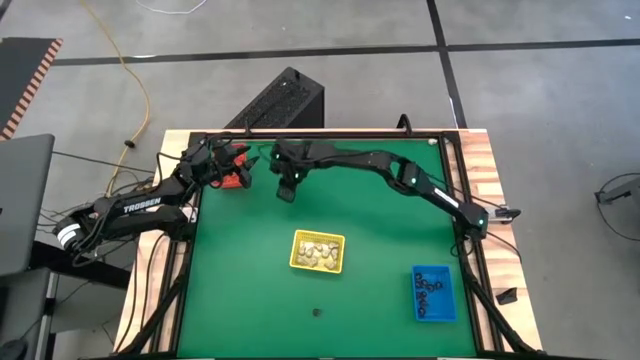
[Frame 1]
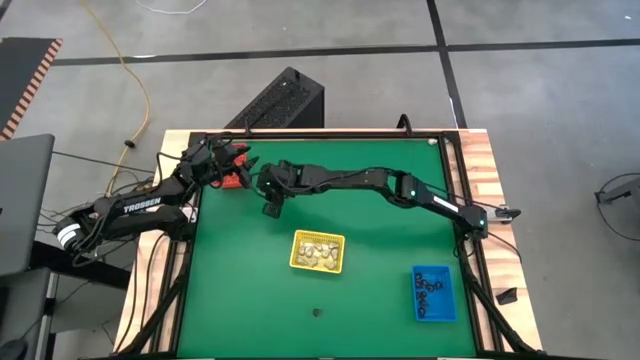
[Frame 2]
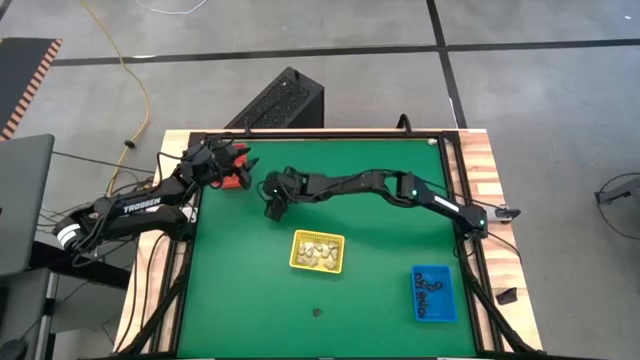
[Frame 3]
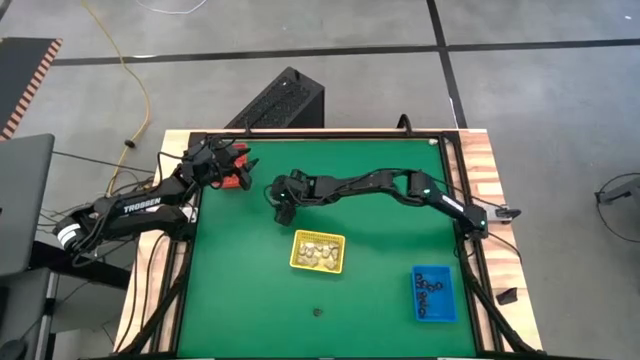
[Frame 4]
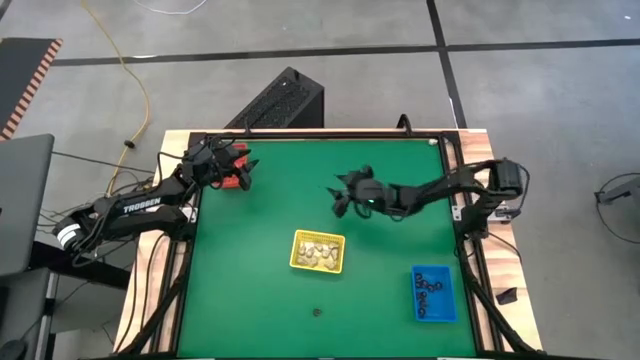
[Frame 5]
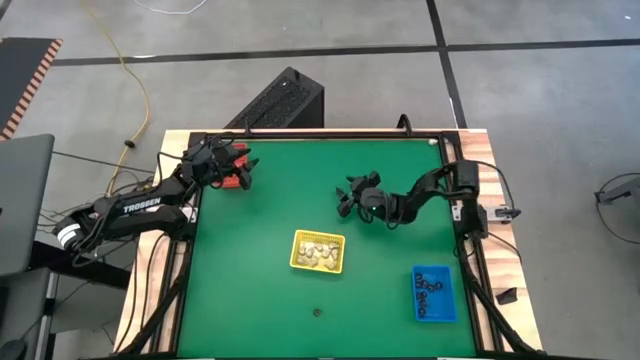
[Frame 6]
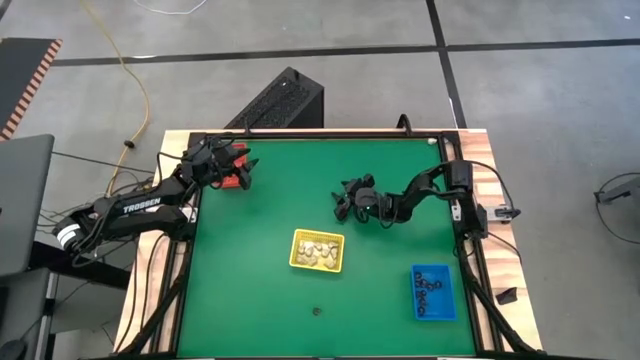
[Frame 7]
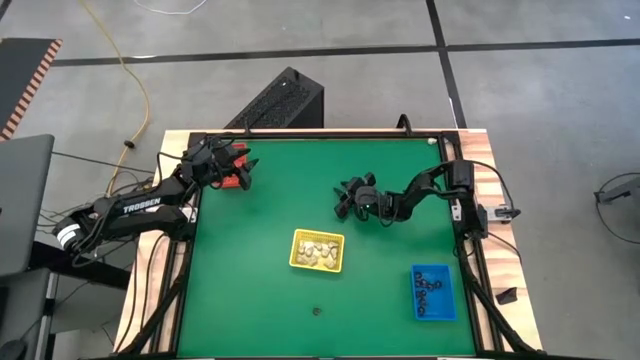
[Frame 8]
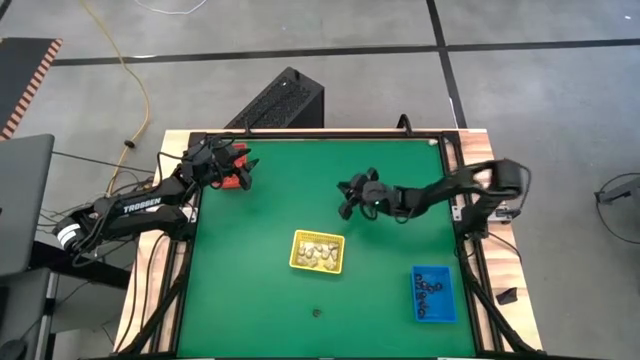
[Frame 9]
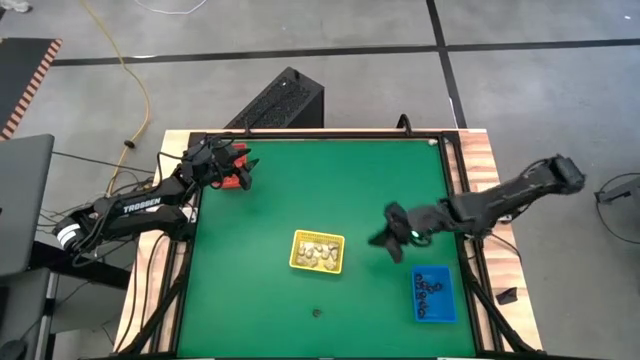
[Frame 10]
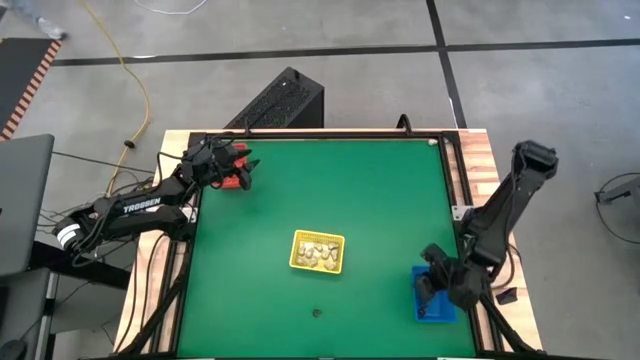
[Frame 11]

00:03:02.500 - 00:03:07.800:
Task: Sort Halloween decoration
Put the black skull toy into the blue bin

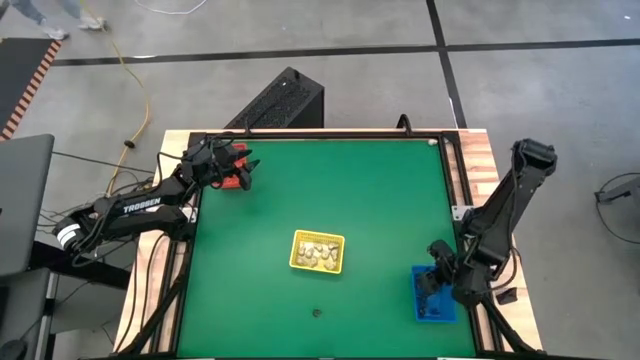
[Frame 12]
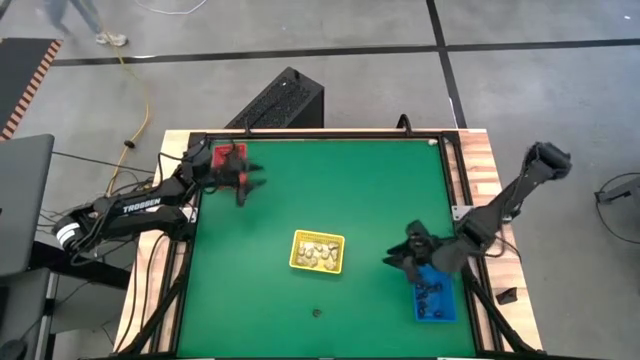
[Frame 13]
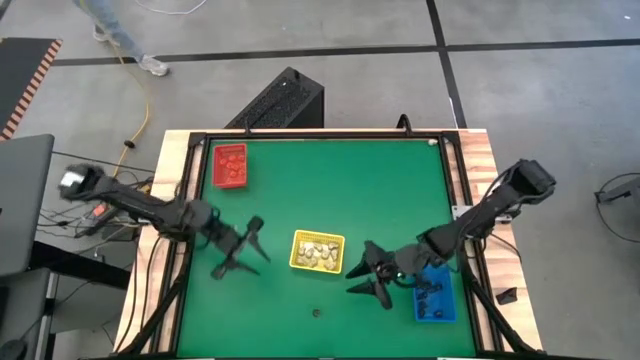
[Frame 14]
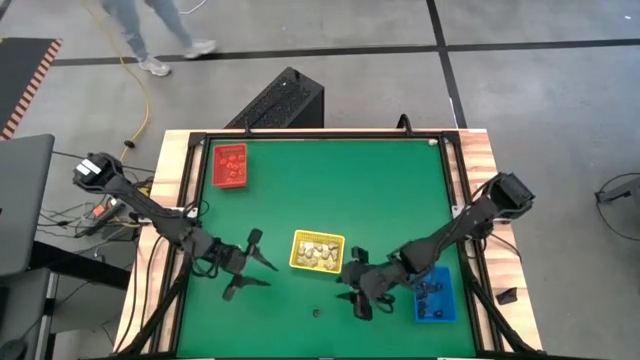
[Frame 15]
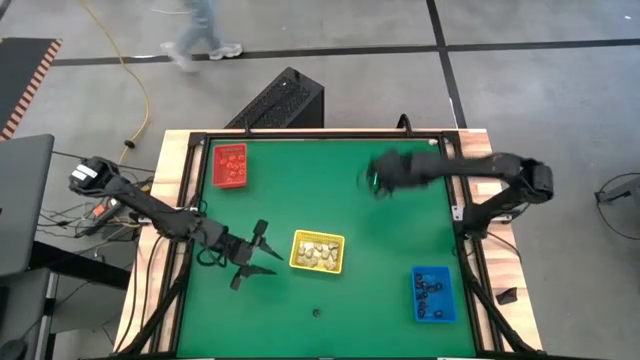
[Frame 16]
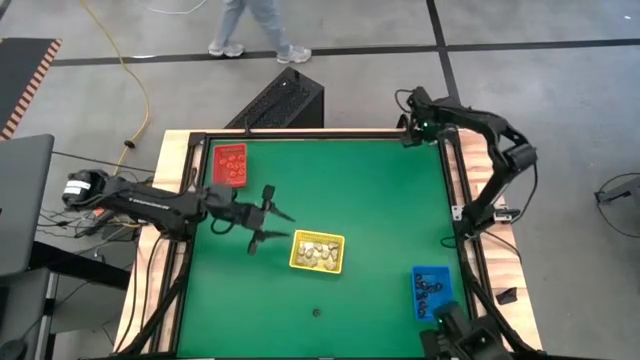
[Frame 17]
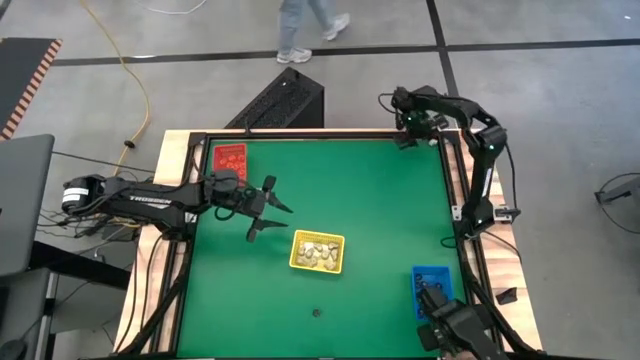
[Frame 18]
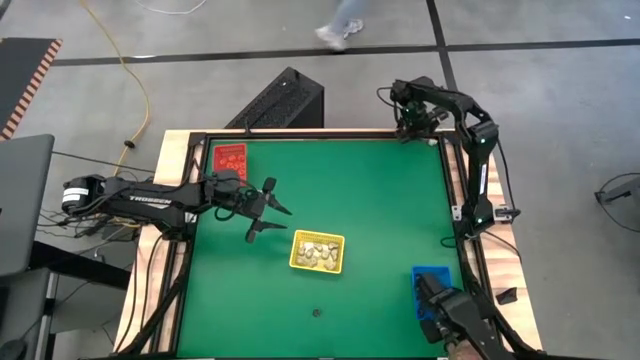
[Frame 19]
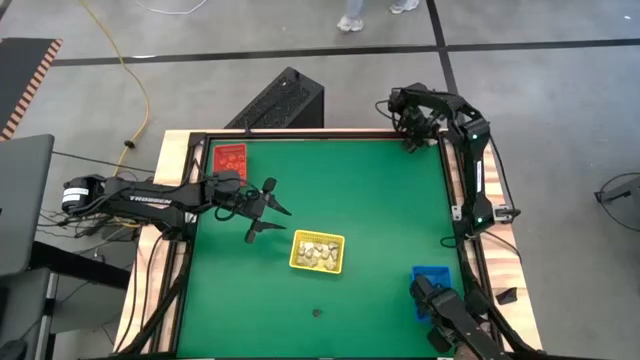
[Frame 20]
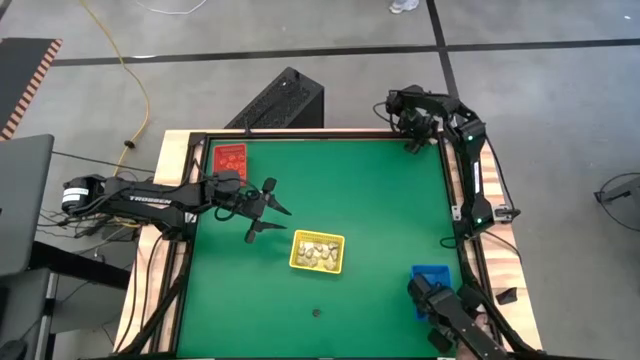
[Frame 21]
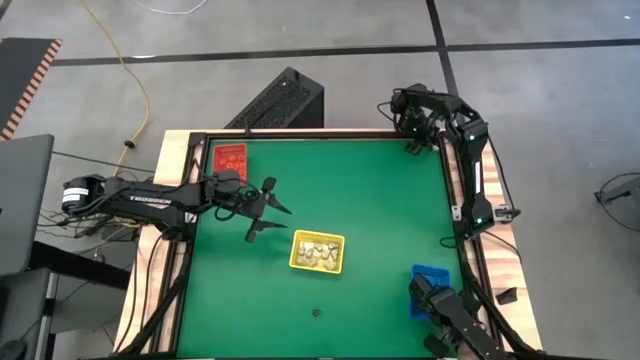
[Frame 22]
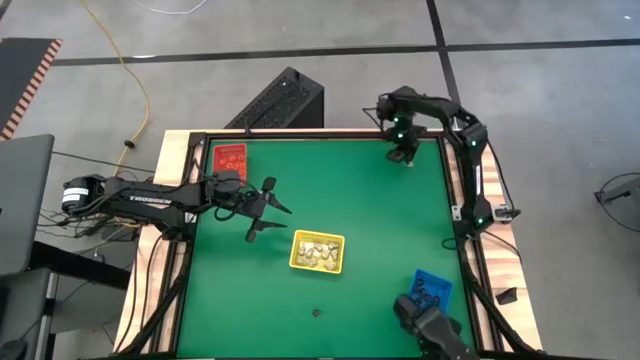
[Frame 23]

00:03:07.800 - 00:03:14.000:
Put the white skull toy into the yellow bin

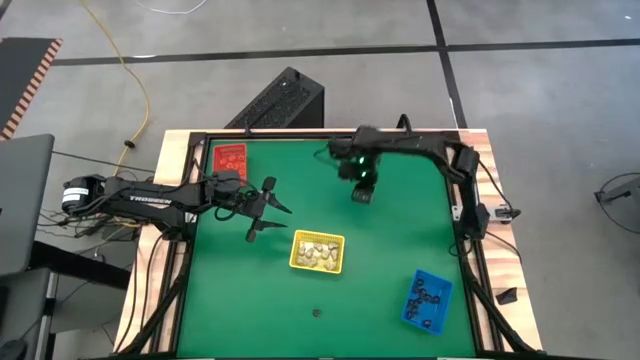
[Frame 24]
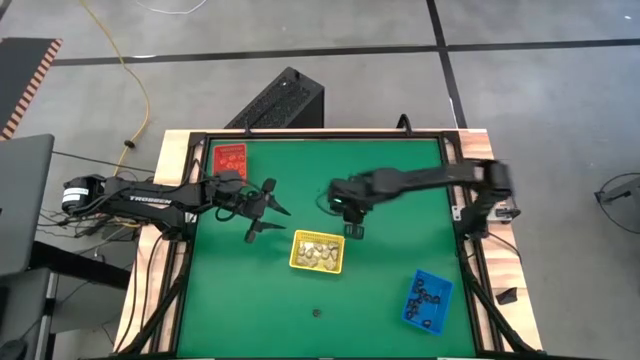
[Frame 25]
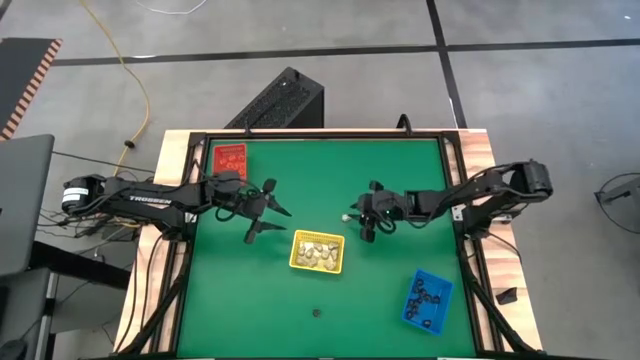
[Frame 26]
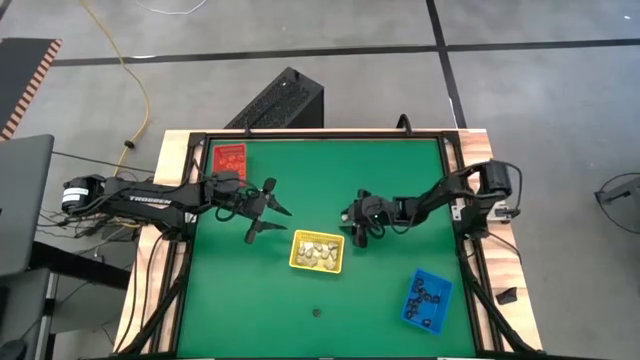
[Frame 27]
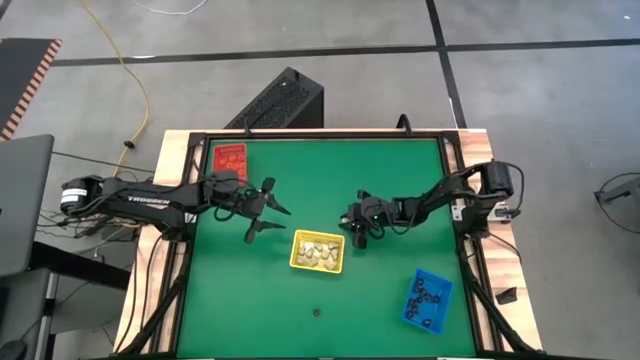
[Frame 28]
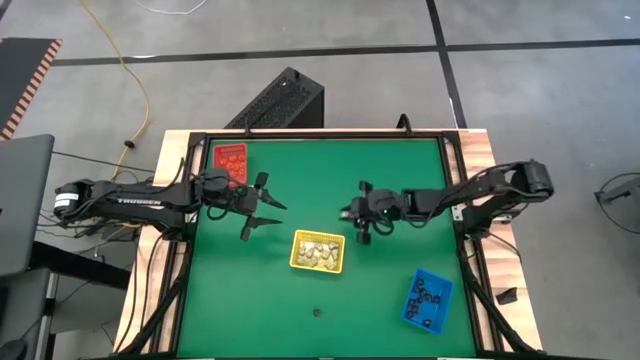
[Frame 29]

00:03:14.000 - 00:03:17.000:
Put the white skull toy into the yellow bin

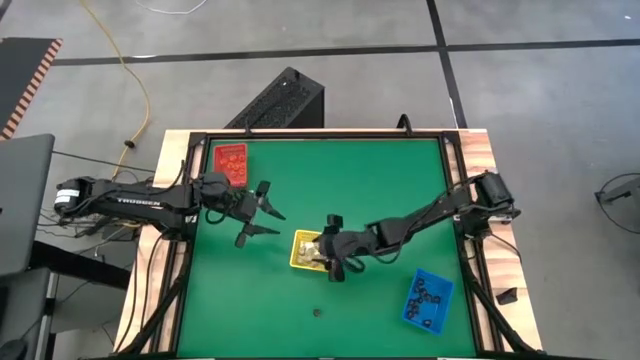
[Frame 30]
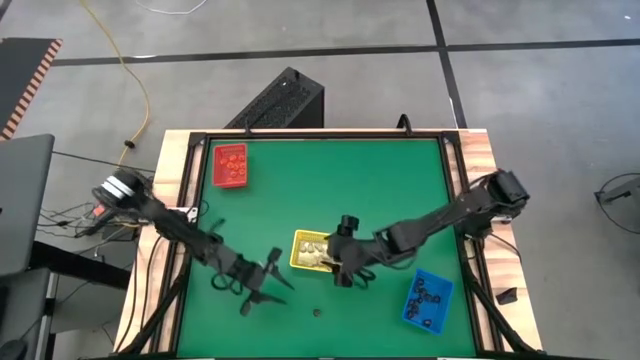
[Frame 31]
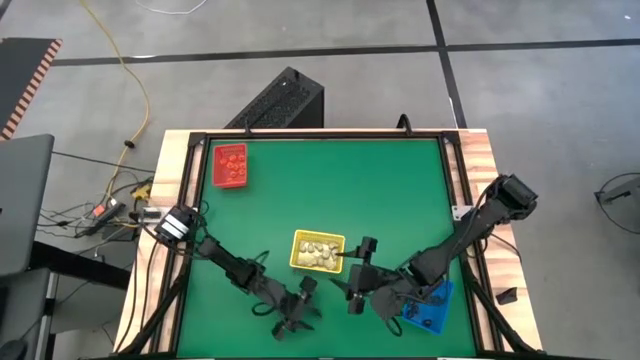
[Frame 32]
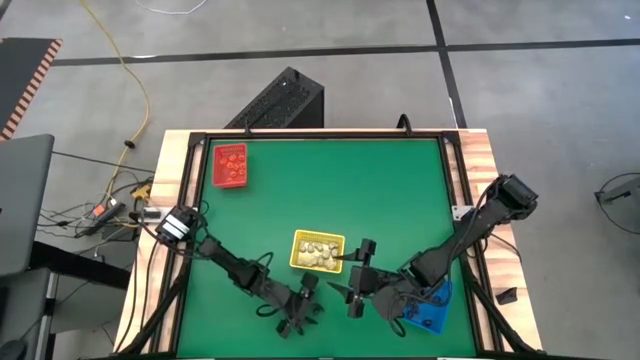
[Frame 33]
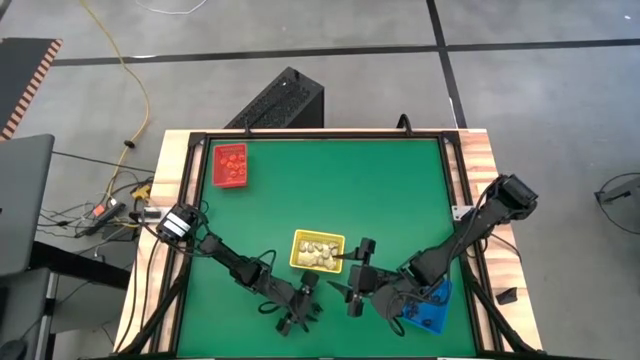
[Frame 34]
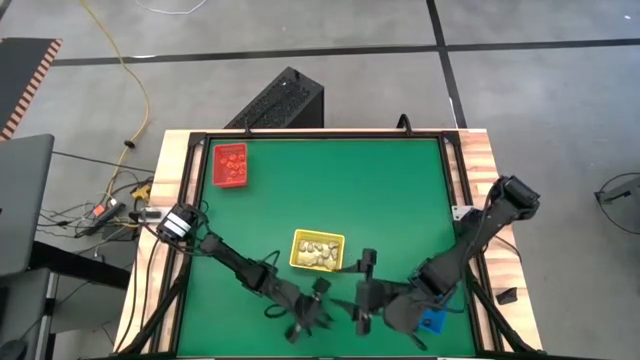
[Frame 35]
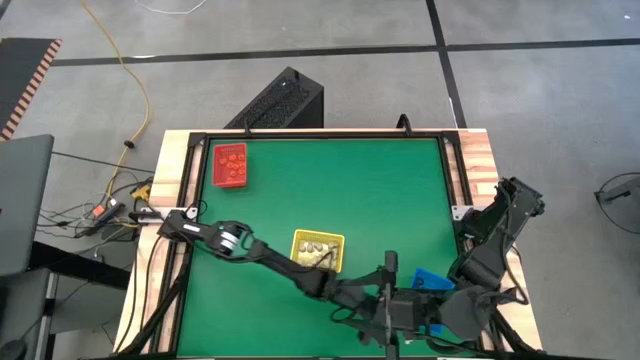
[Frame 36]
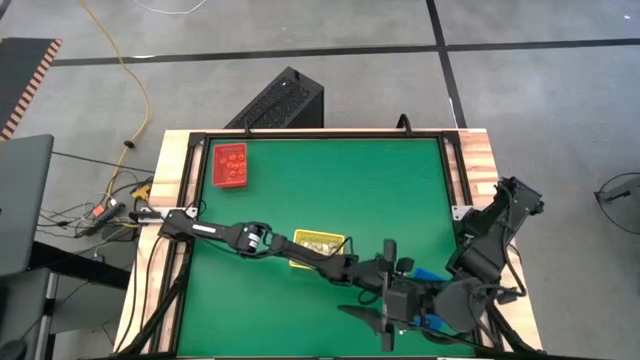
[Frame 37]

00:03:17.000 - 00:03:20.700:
Put the black skull toy into the blue bin

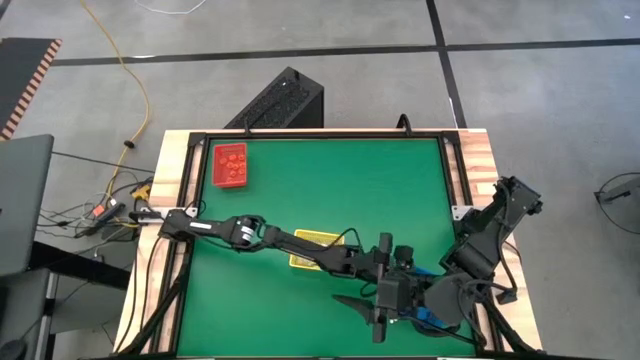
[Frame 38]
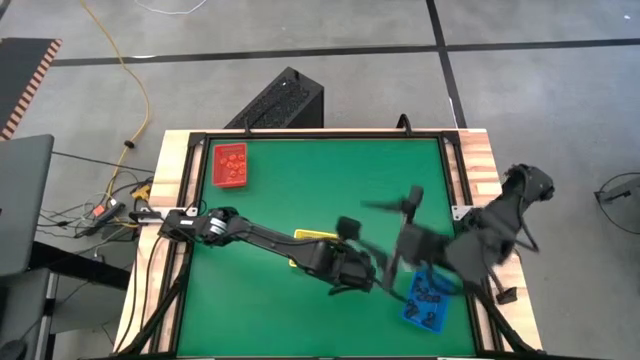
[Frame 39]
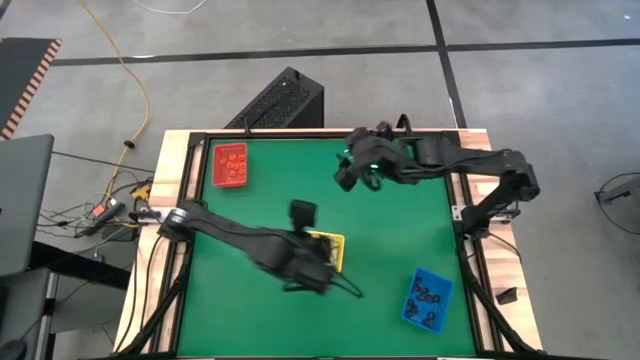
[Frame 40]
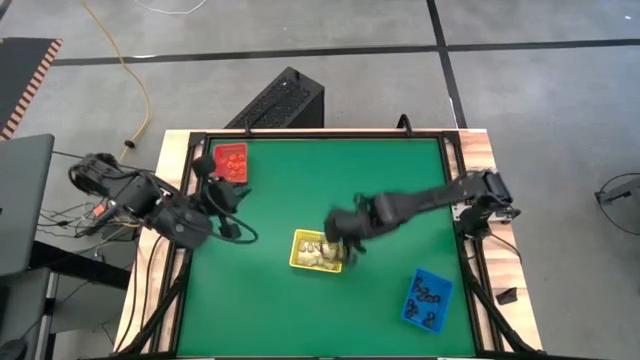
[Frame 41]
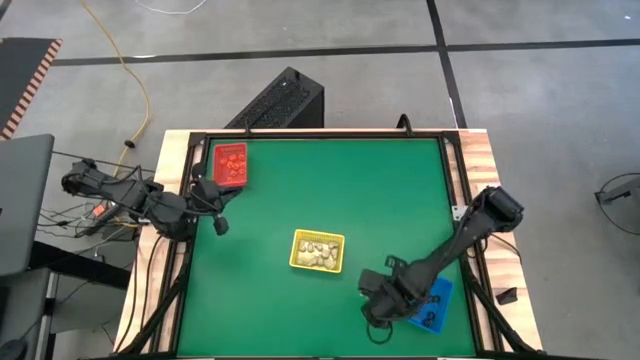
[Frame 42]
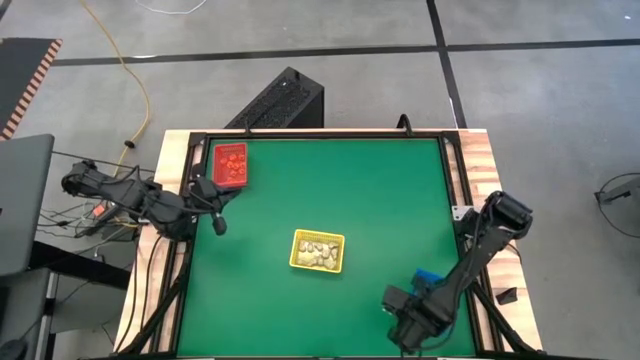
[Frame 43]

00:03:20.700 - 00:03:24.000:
Adjust the blue bin on the table
